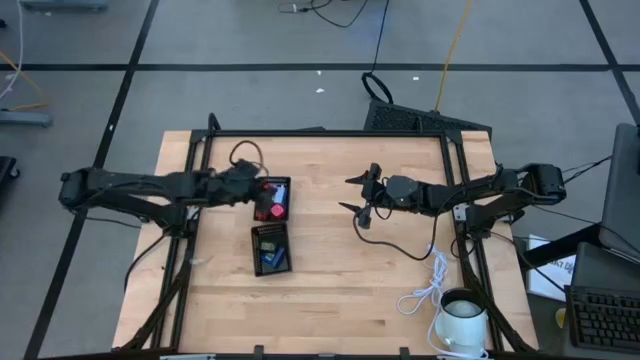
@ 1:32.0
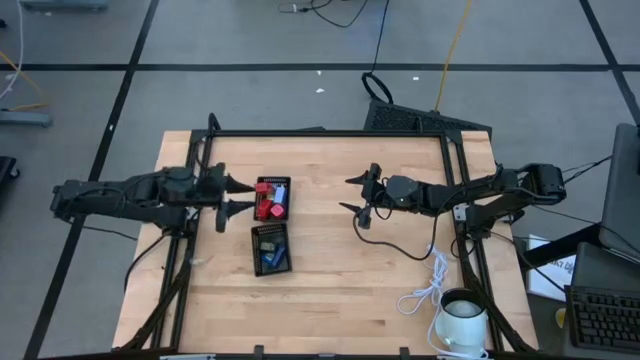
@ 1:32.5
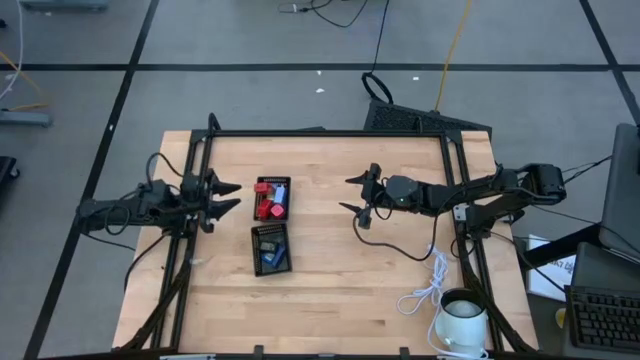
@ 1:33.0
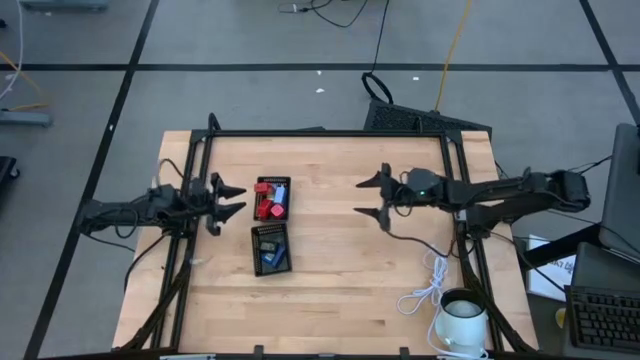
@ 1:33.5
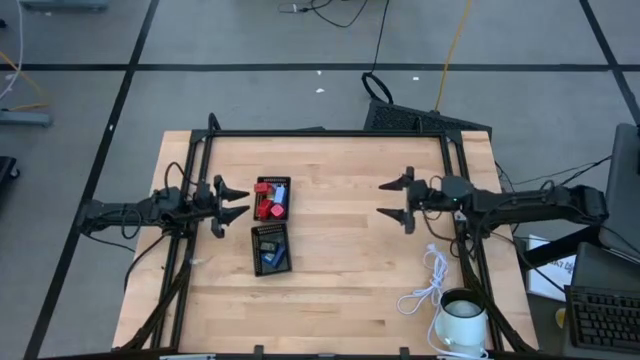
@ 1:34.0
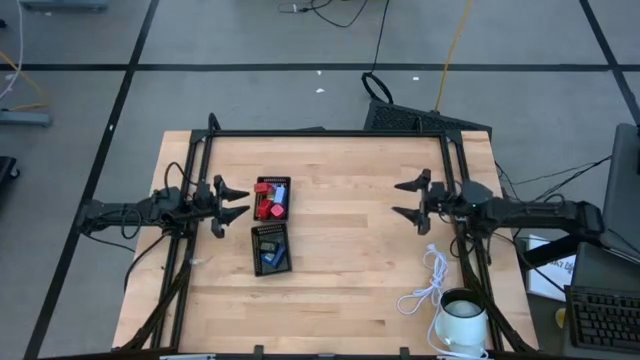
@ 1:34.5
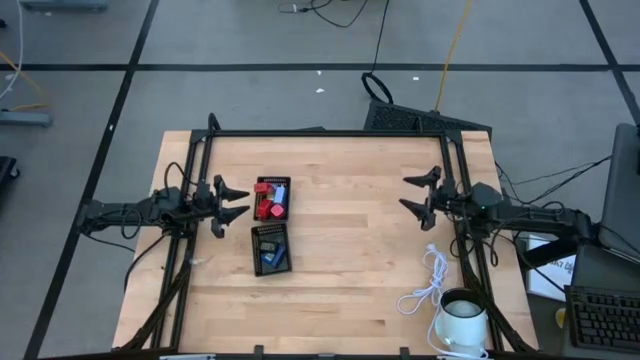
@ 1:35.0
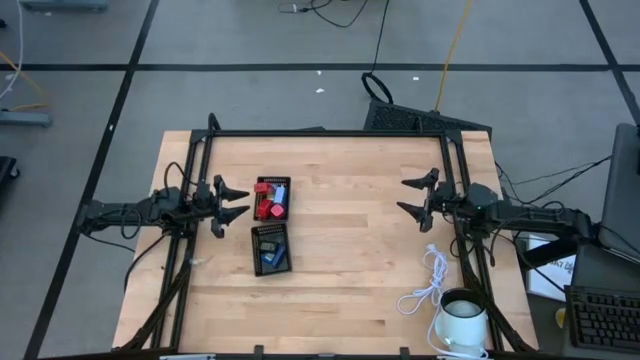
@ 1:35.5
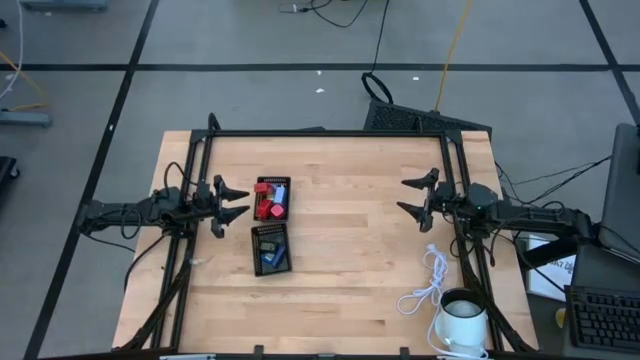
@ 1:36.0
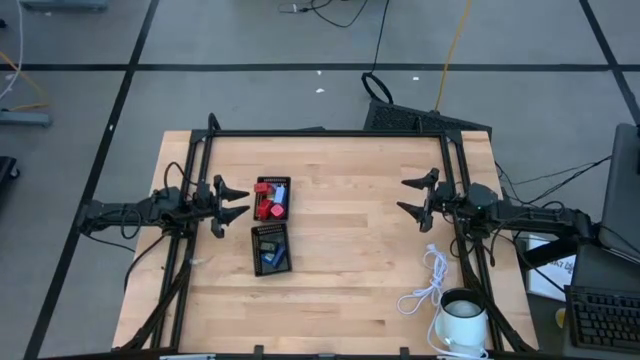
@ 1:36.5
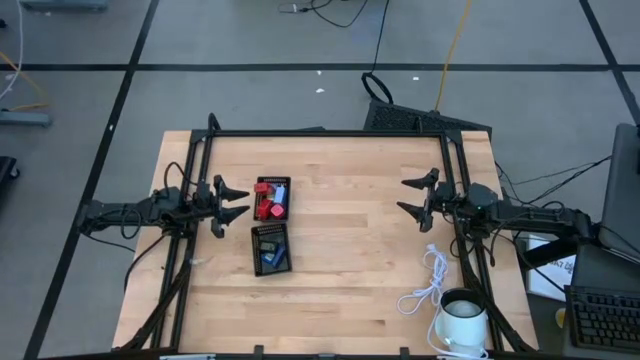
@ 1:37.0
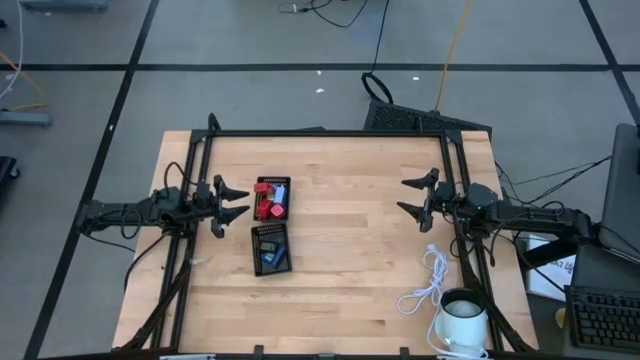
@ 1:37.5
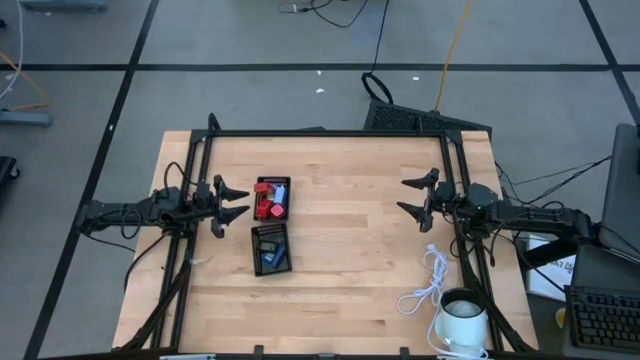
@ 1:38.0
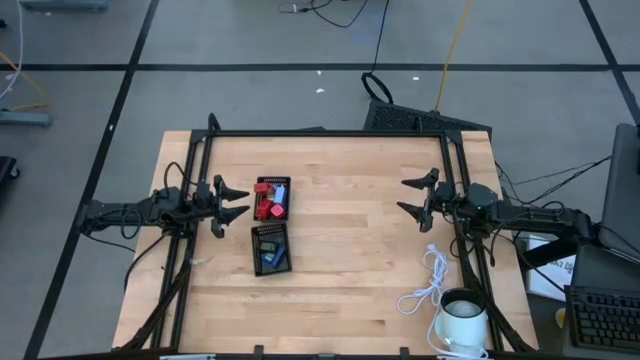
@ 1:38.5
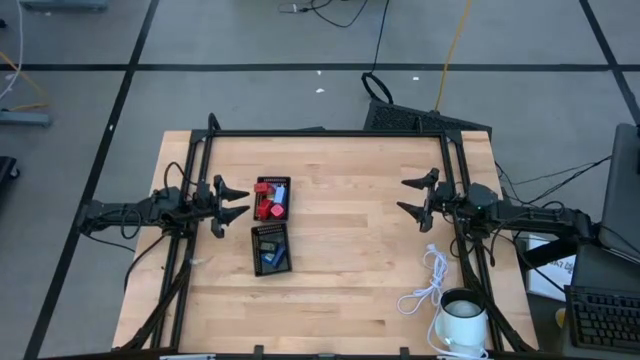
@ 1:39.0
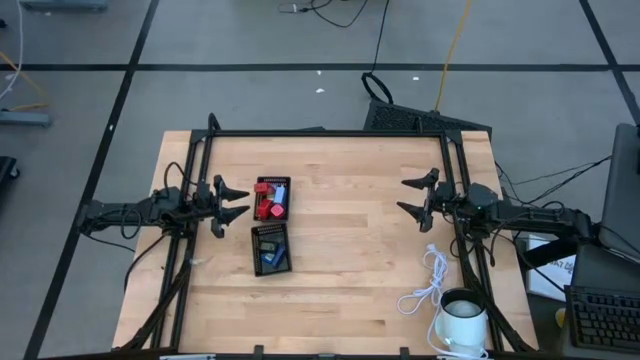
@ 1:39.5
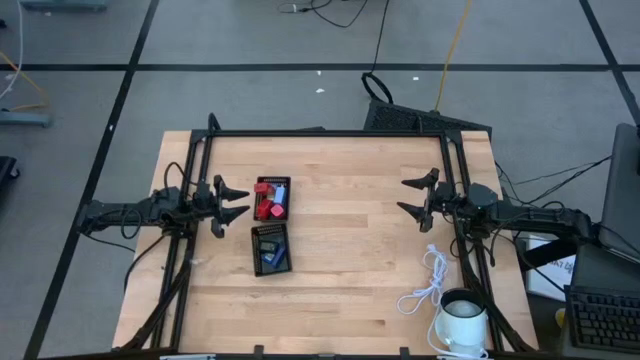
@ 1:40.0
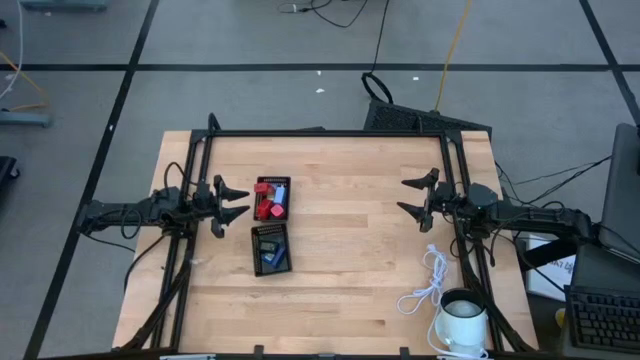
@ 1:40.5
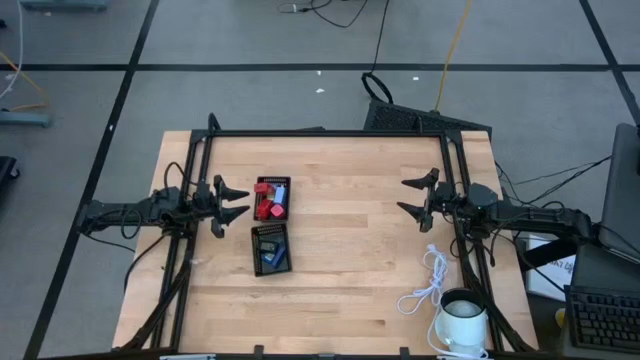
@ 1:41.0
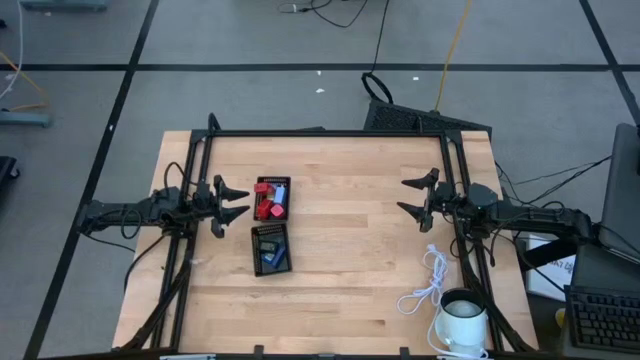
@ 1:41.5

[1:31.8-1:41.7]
Task: Pick & Place Office items
Return to Home Position

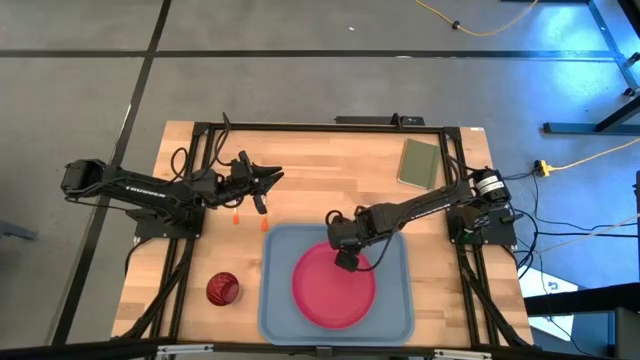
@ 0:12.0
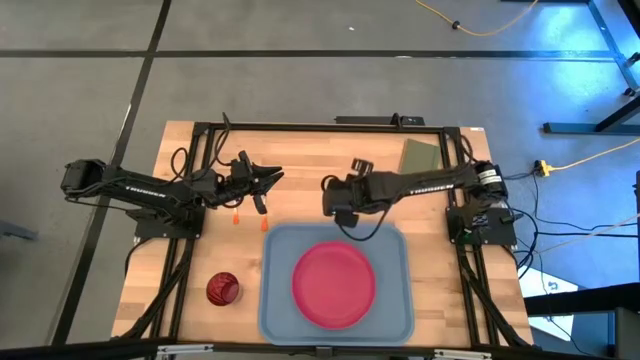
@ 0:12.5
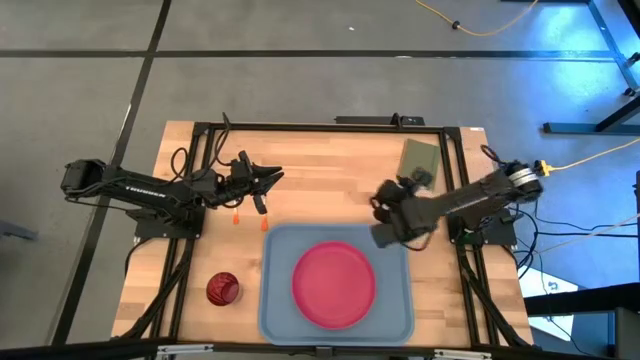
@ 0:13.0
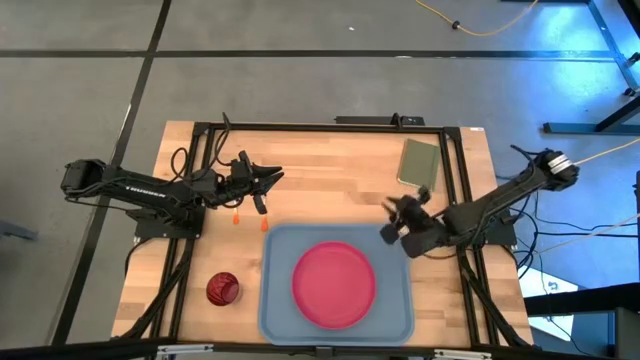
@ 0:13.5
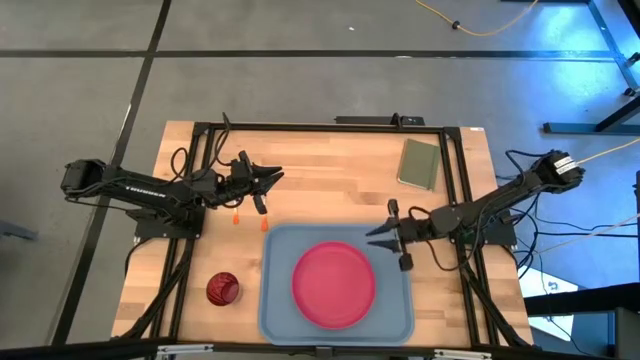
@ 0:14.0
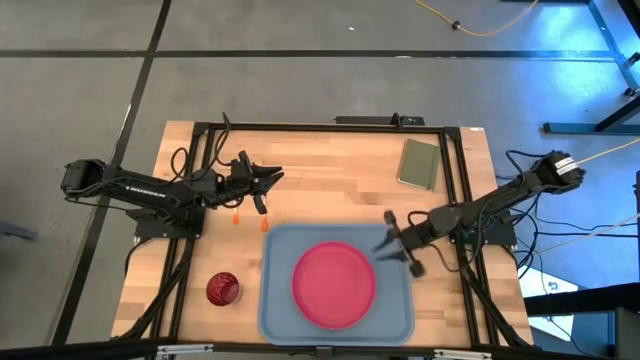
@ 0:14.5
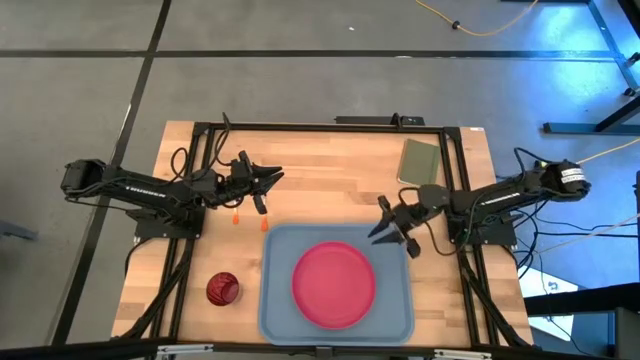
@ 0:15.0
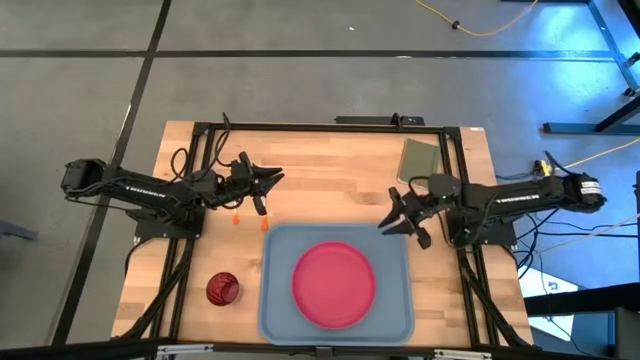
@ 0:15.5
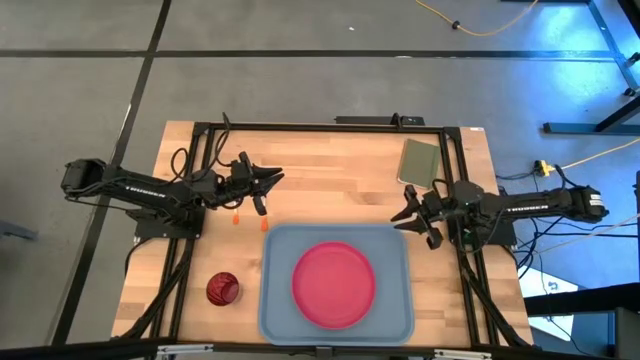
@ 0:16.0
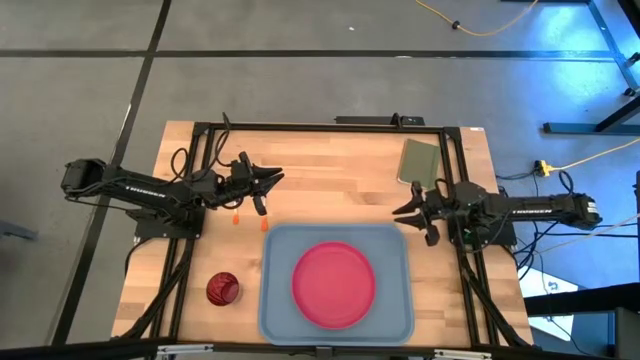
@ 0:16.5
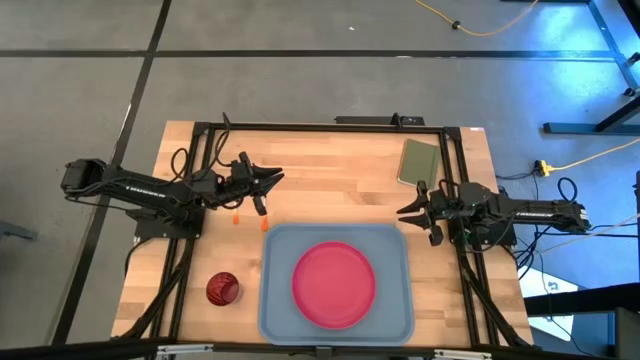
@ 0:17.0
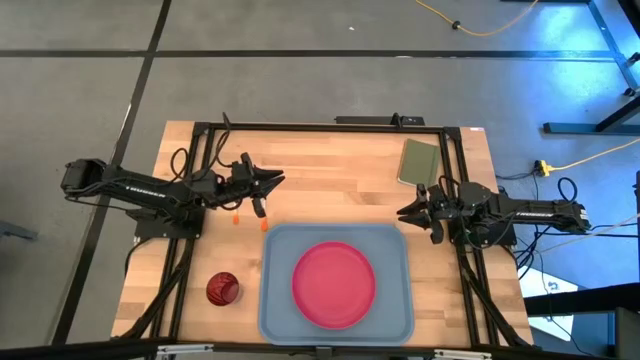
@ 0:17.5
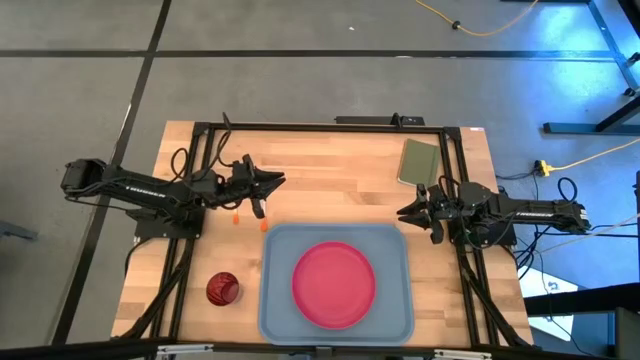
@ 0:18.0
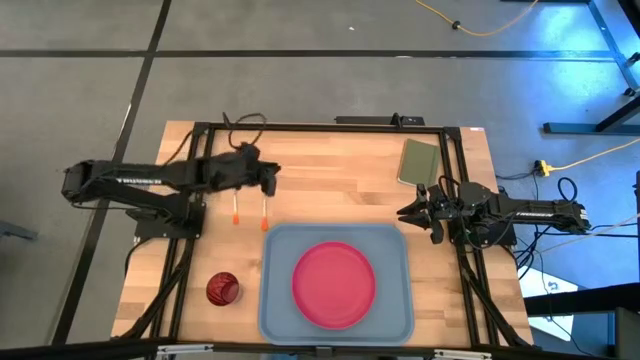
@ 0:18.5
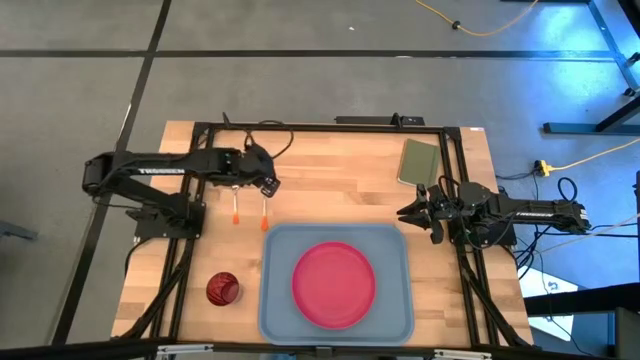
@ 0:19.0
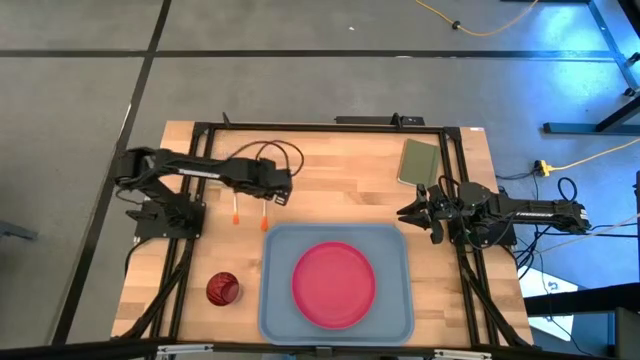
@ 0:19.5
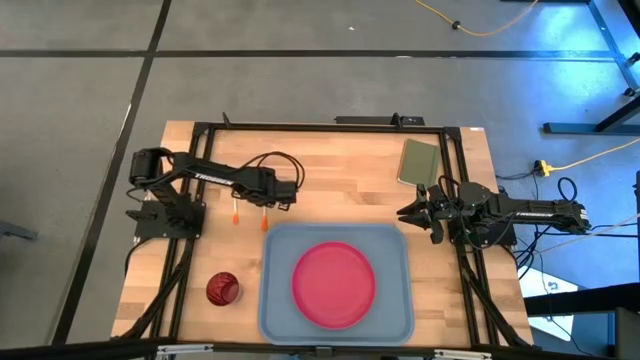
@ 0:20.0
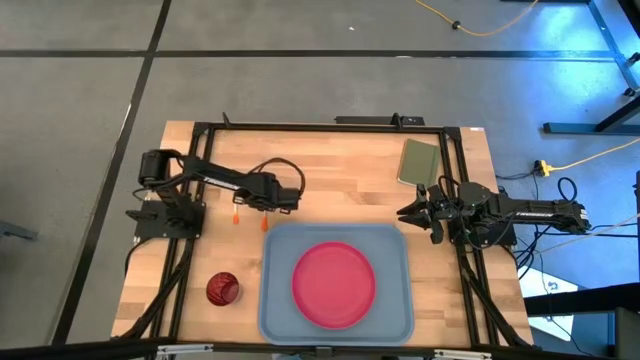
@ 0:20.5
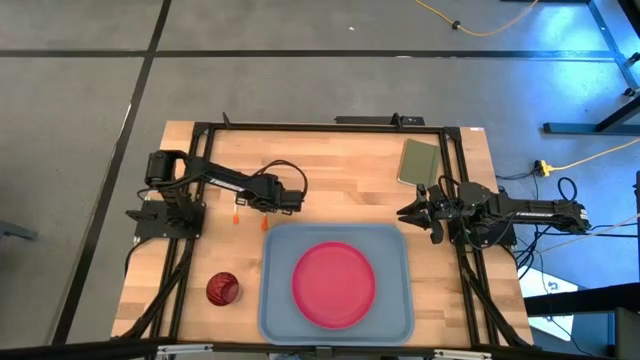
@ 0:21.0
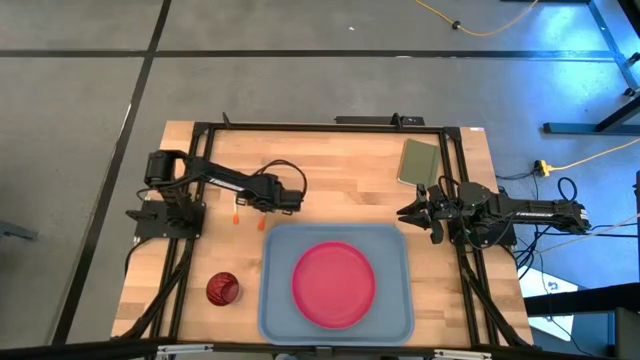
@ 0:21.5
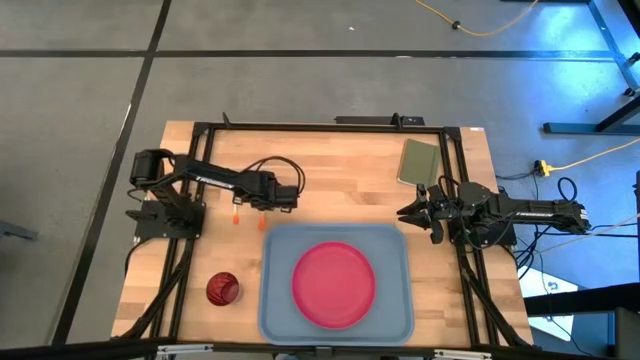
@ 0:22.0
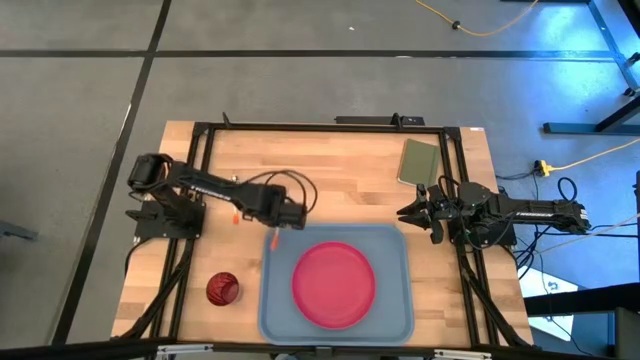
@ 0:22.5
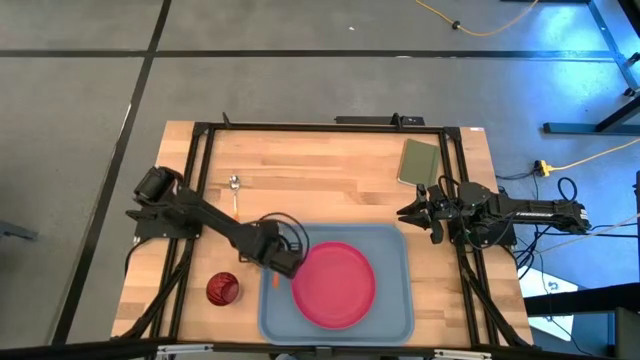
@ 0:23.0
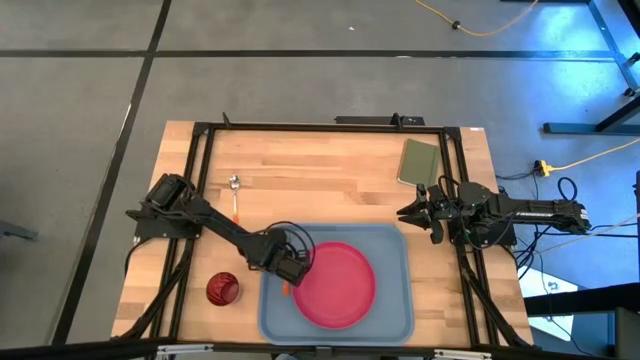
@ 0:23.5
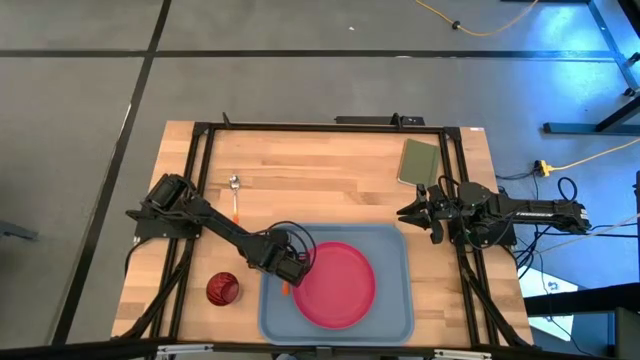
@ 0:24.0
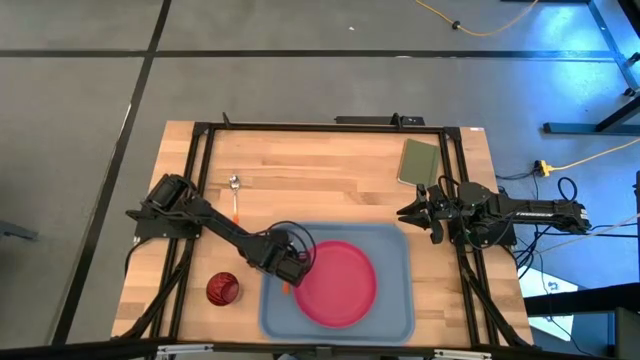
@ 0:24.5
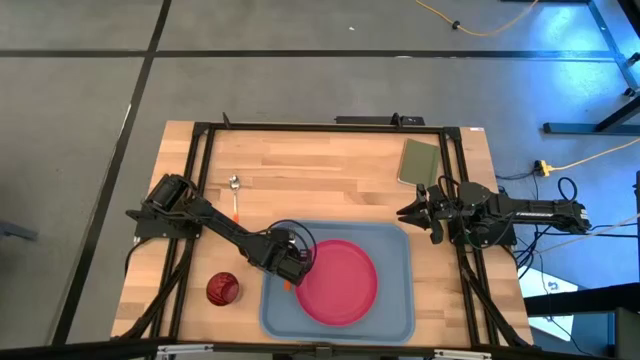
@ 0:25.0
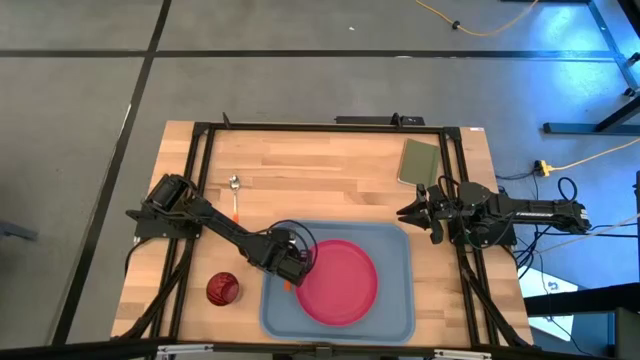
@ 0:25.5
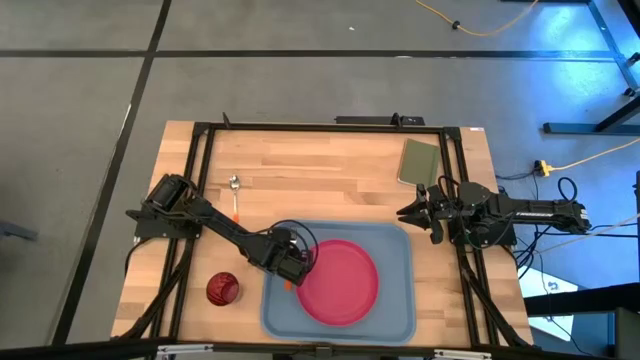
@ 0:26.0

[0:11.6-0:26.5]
Task: Pick and place plate/cup/fork/spoon on tray
Put the orange fork on the blue tray to the left of the pink plate
